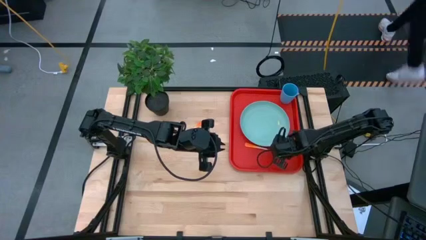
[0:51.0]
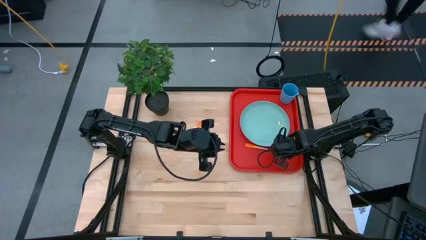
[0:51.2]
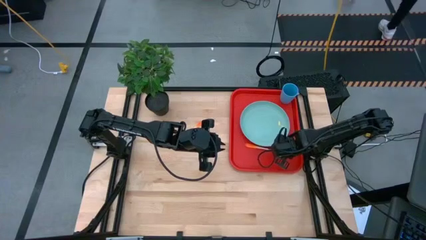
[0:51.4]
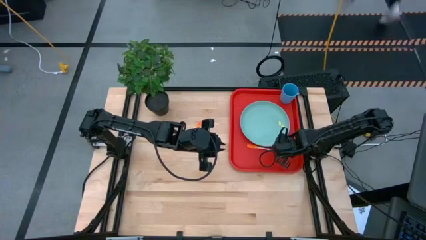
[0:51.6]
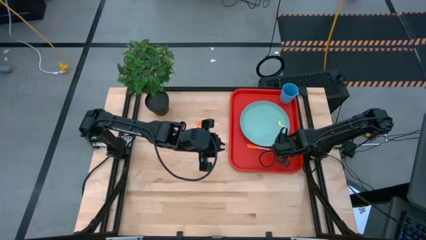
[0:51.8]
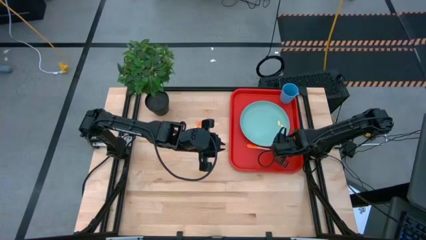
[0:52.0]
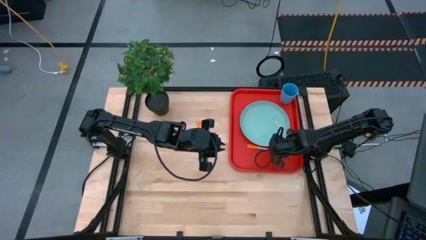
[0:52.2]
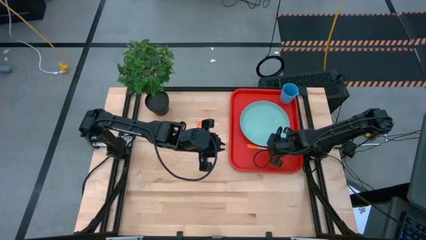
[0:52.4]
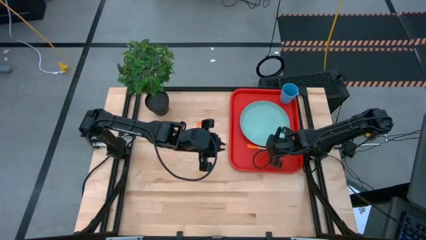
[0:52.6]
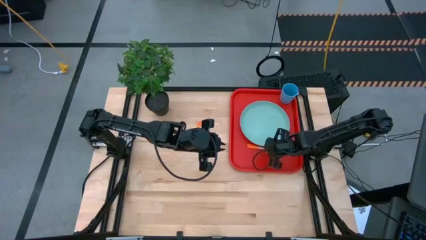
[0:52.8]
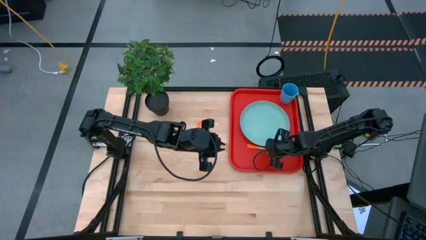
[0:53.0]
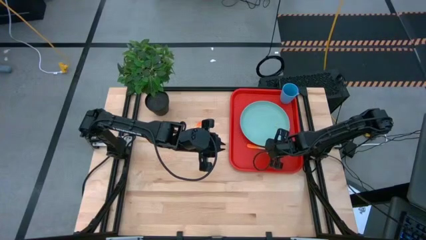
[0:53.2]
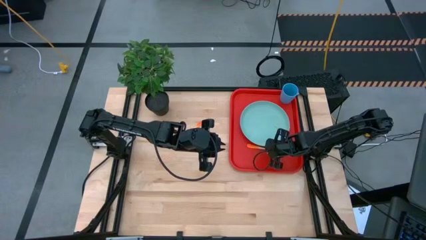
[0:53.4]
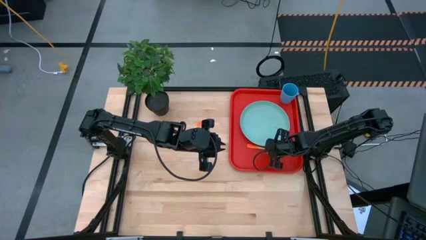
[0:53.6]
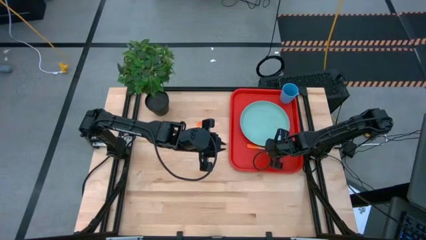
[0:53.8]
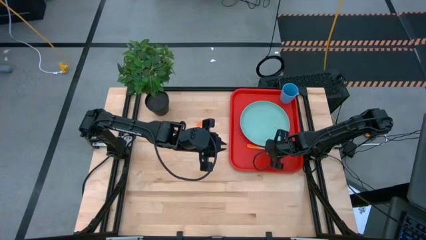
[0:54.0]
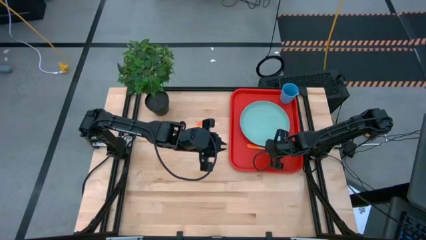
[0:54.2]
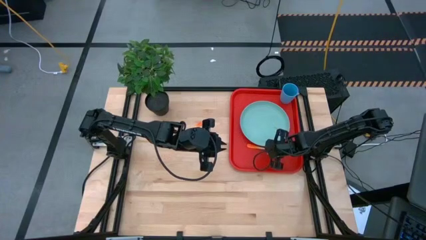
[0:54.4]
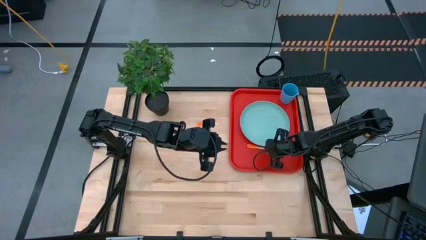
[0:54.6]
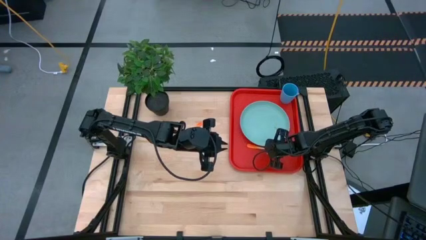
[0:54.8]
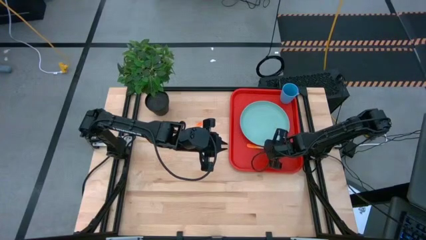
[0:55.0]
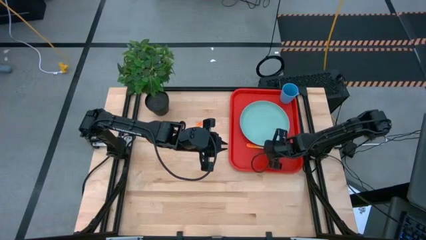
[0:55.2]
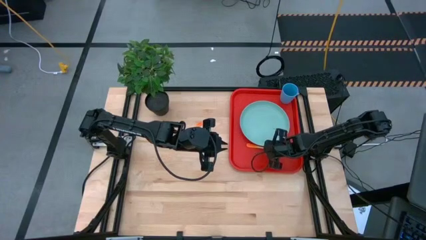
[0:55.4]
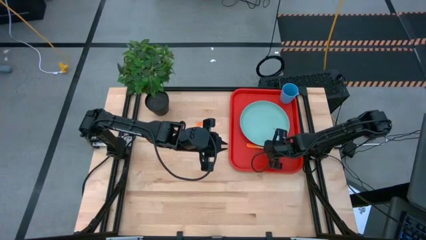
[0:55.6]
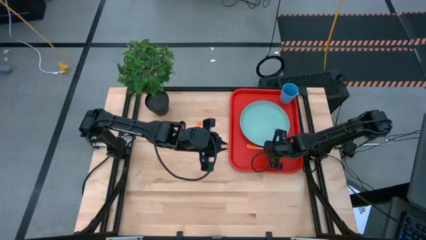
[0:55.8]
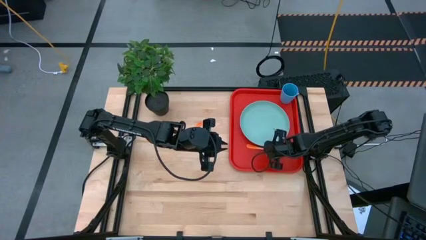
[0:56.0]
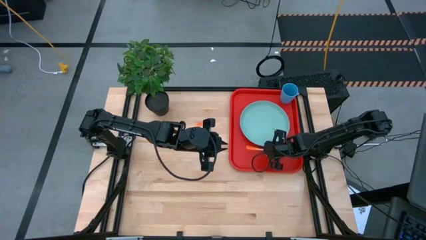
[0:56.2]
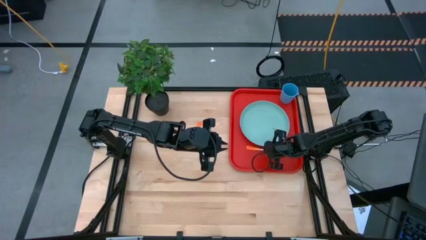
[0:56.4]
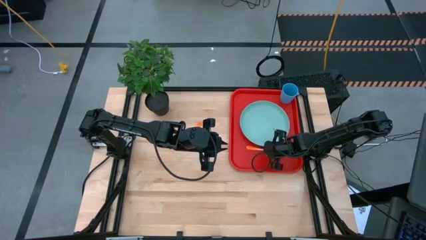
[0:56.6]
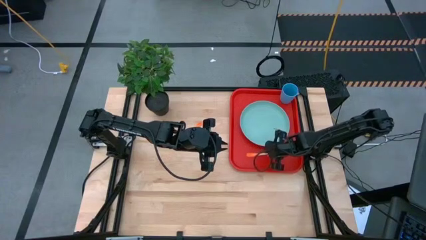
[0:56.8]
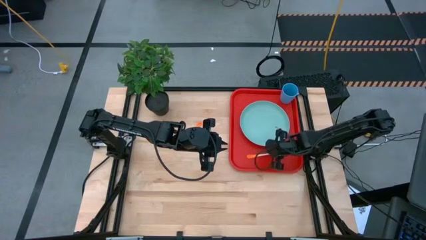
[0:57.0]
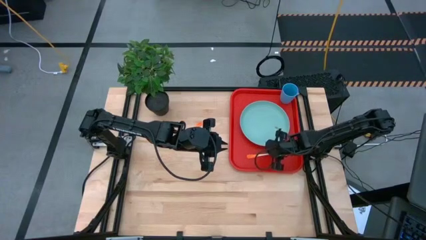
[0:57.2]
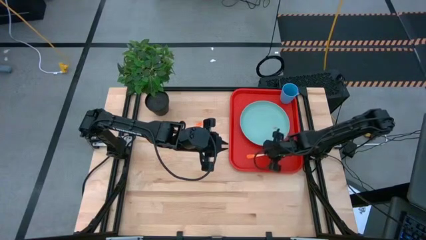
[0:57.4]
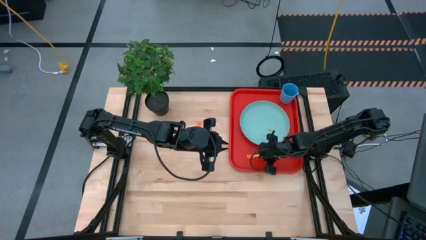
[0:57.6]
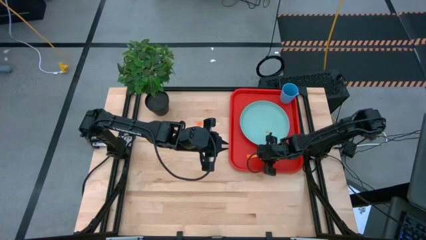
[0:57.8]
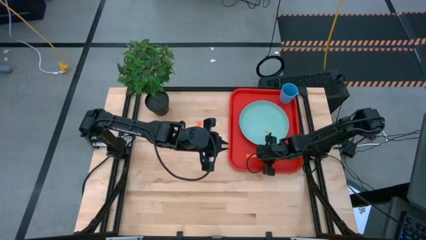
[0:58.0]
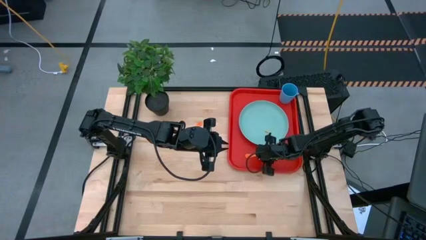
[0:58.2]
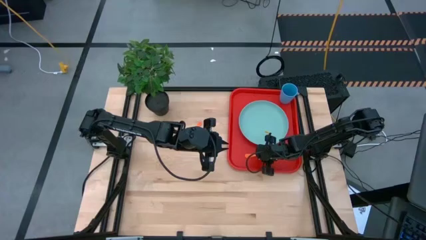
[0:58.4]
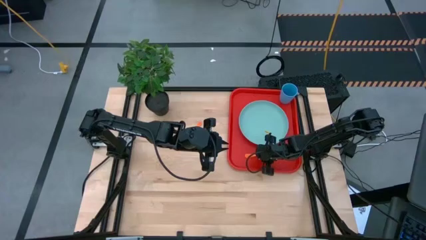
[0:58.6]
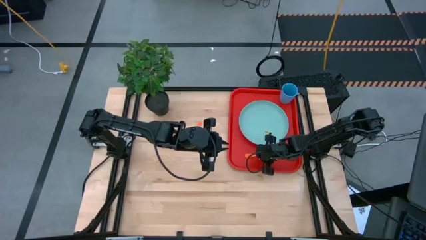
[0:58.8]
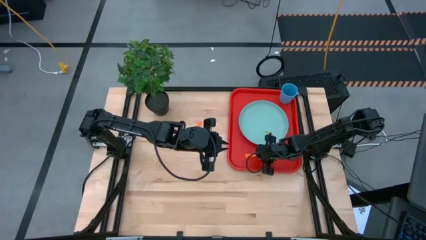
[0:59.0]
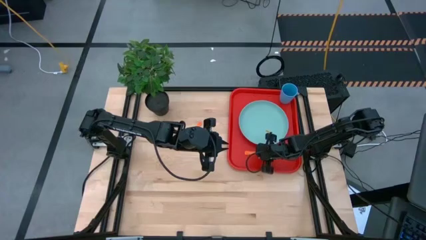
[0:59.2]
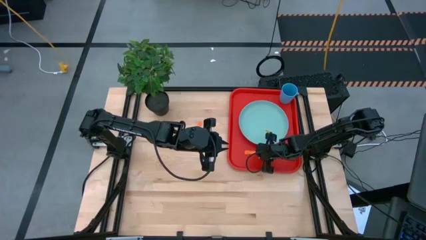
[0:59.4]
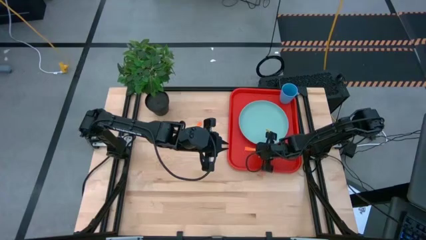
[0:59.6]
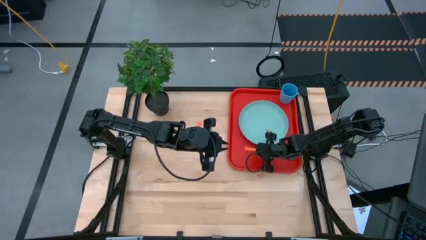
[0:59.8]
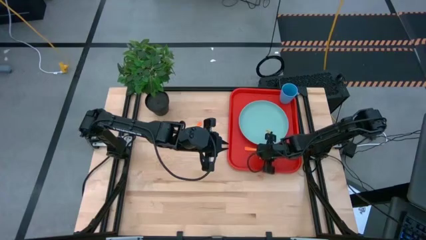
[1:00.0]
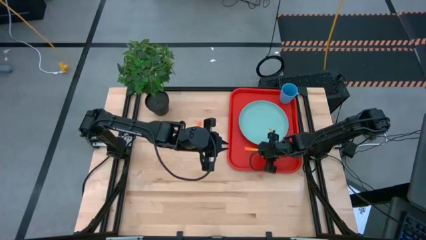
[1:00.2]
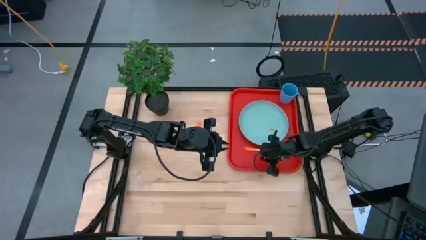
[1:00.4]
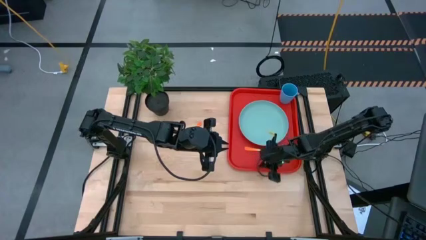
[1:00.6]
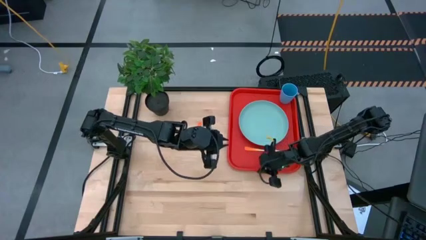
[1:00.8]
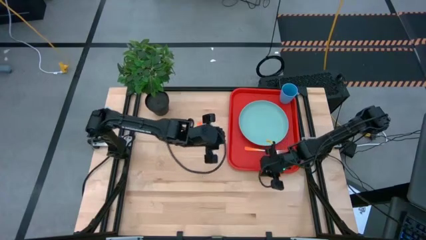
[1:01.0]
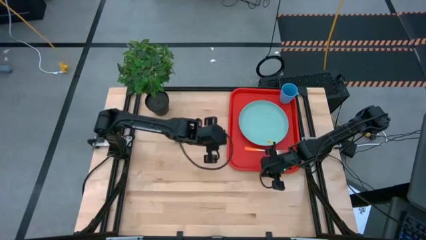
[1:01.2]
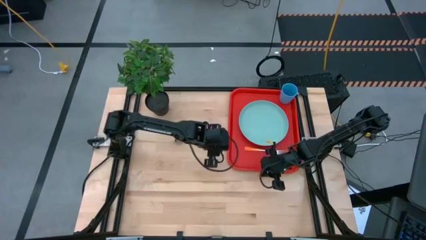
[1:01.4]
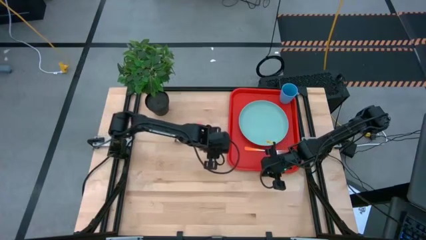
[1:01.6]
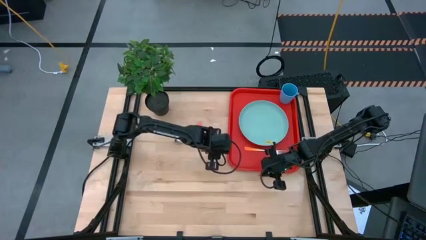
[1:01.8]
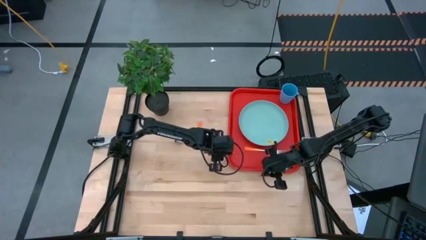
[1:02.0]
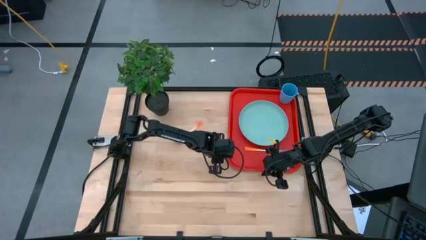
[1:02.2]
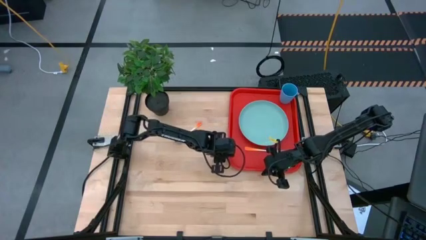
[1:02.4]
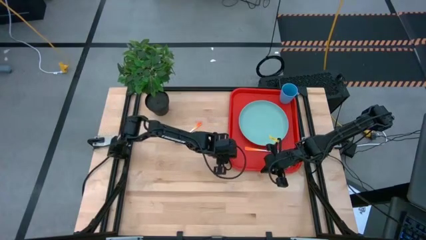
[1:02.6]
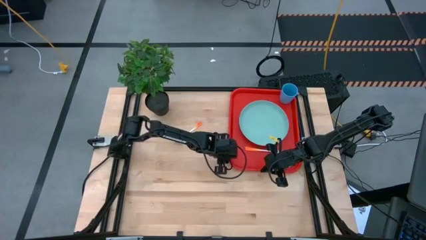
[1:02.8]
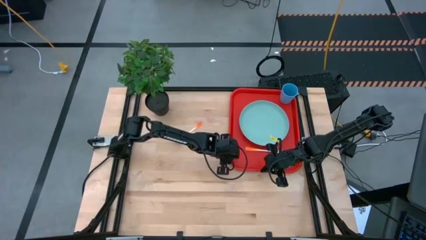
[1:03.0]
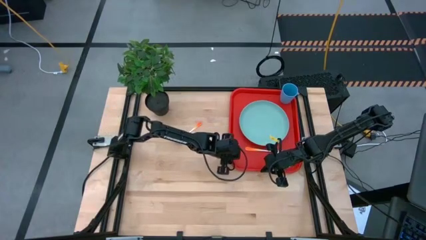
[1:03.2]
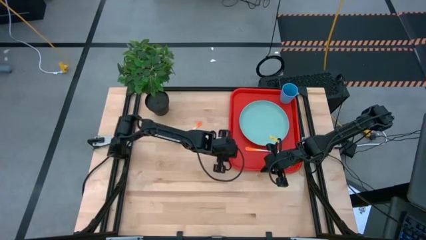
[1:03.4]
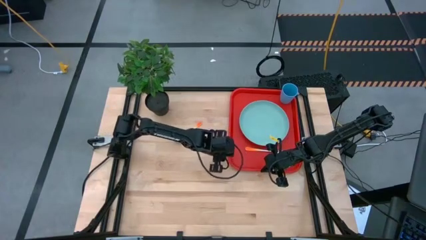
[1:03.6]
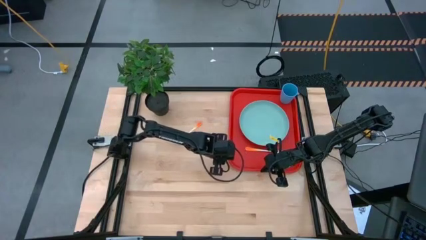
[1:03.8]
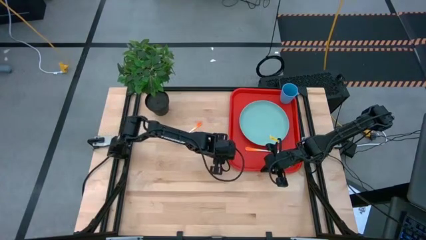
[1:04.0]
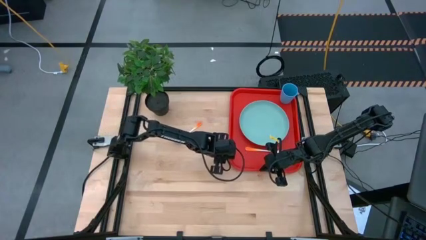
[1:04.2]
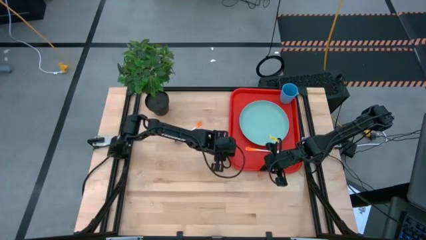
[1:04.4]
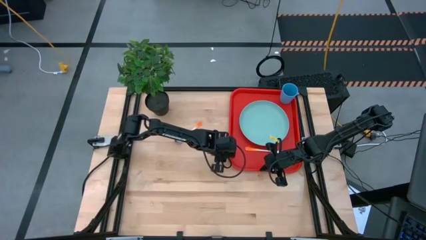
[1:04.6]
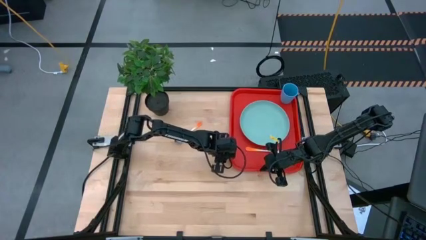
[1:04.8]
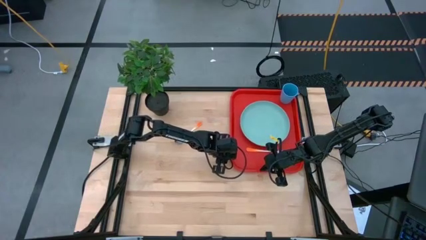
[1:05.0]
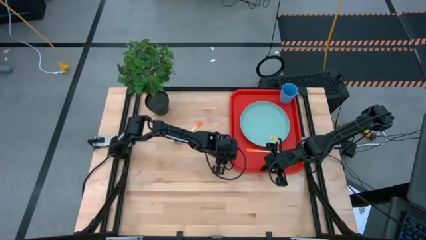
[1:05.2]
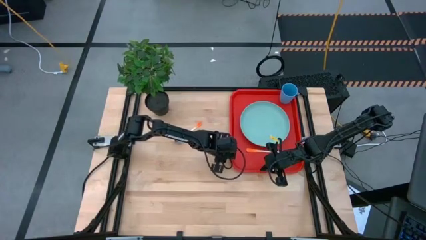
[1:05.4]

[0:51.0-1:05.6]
Task: Pick and place plate/cup/fork/spoon on tray
Put the orange fork on the red tray at the bottom of the light green plate
